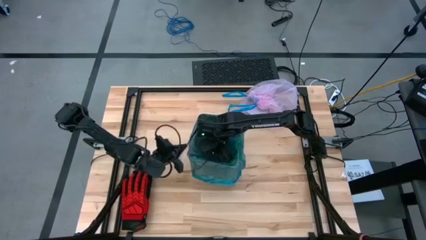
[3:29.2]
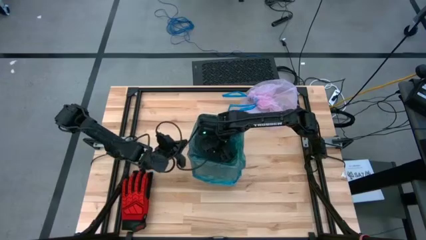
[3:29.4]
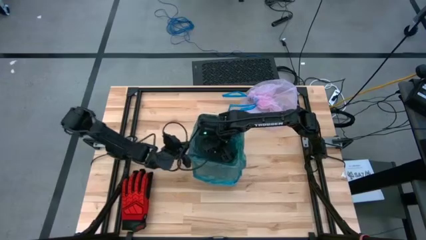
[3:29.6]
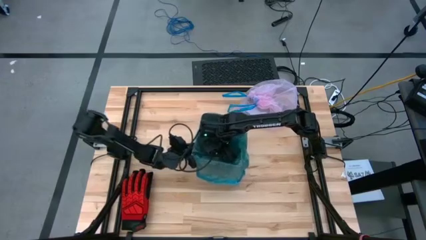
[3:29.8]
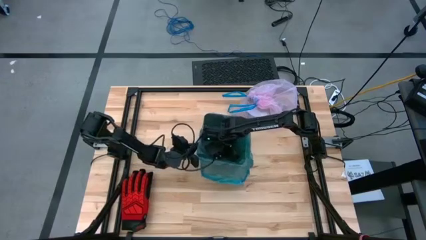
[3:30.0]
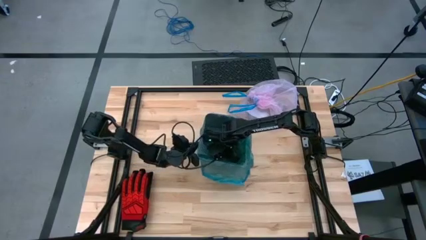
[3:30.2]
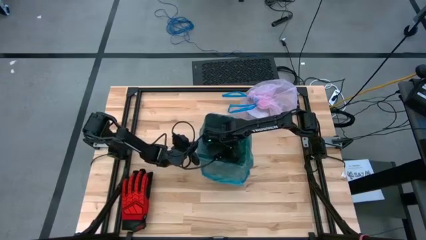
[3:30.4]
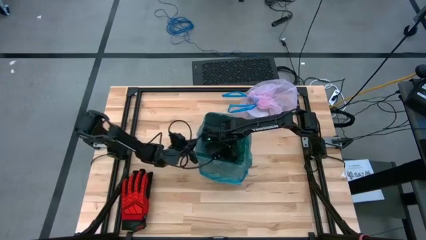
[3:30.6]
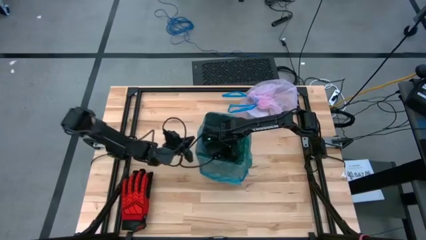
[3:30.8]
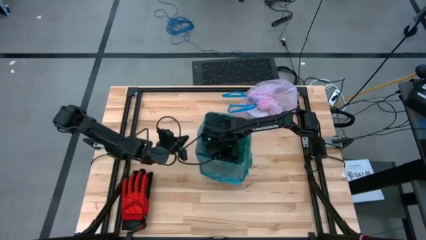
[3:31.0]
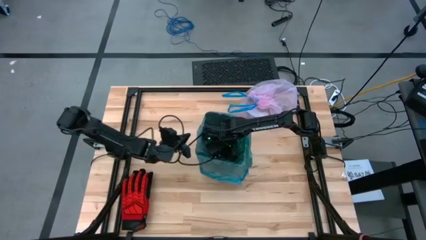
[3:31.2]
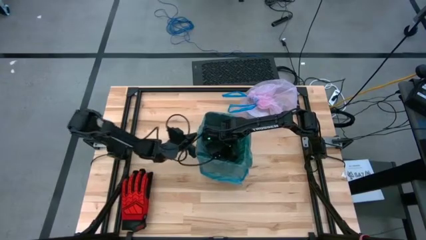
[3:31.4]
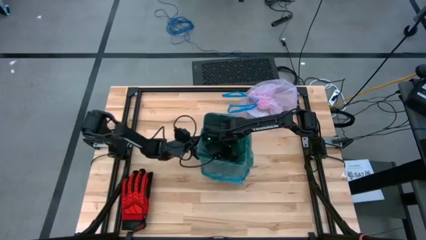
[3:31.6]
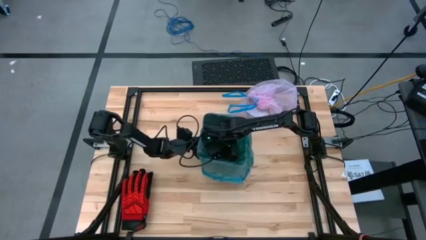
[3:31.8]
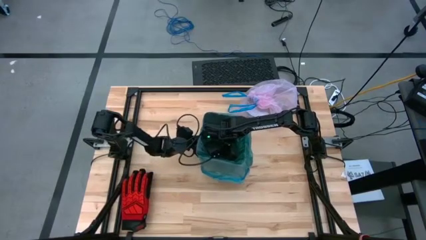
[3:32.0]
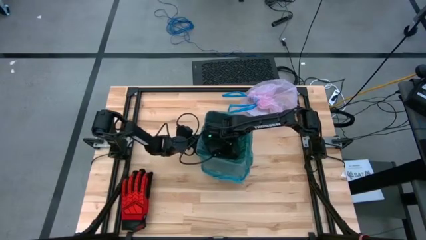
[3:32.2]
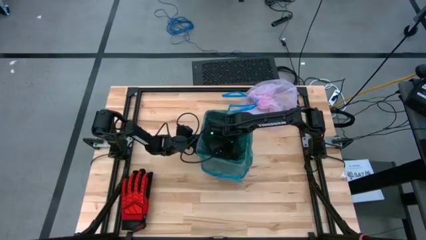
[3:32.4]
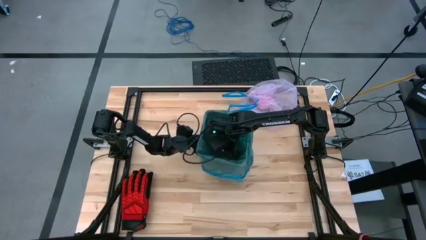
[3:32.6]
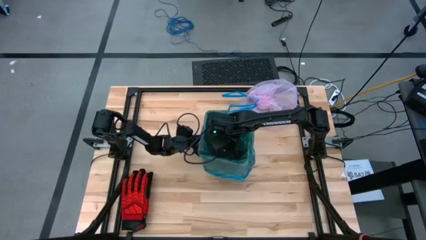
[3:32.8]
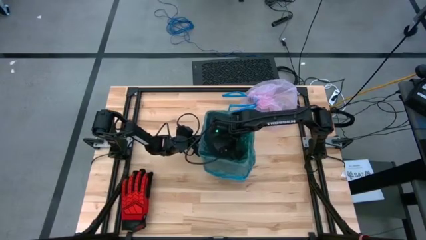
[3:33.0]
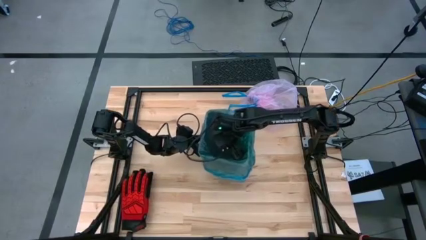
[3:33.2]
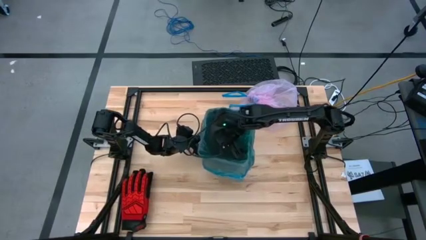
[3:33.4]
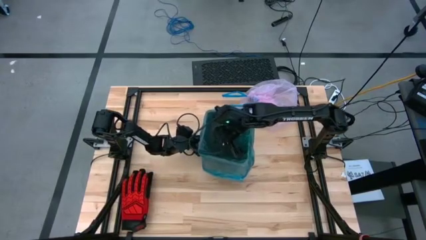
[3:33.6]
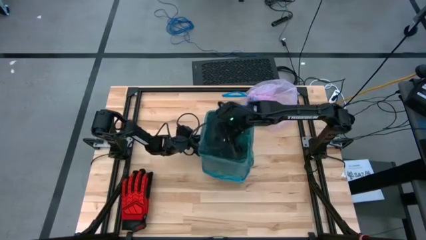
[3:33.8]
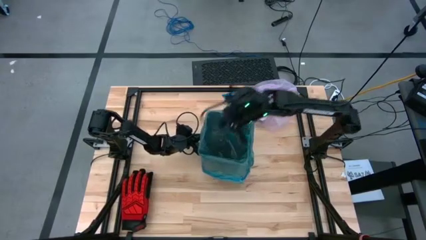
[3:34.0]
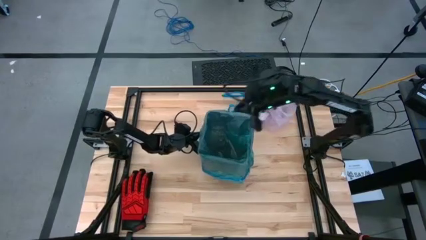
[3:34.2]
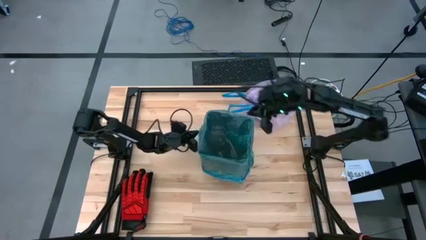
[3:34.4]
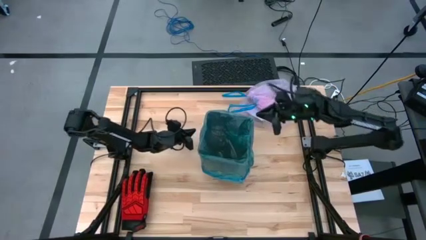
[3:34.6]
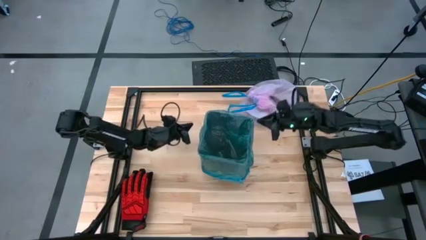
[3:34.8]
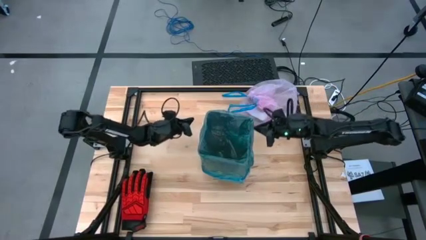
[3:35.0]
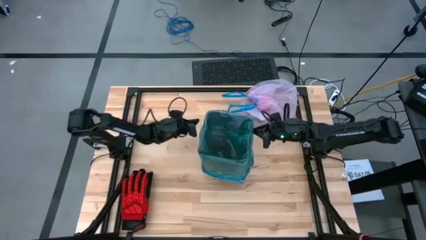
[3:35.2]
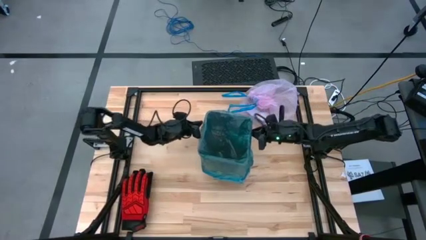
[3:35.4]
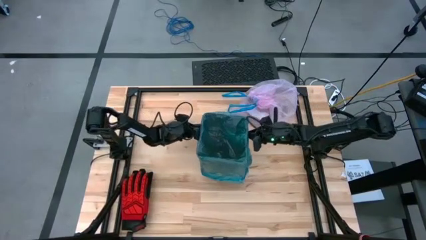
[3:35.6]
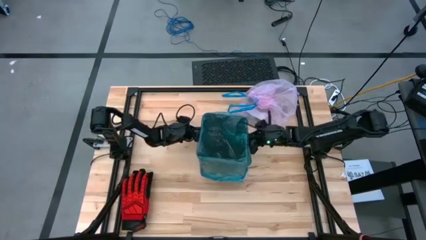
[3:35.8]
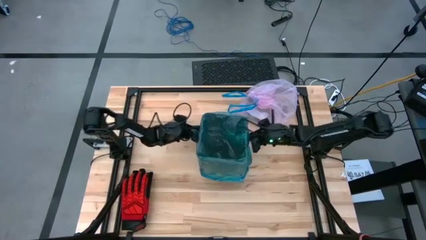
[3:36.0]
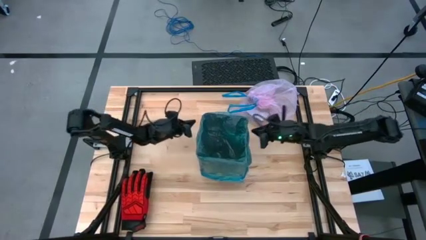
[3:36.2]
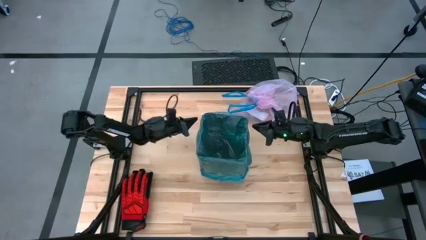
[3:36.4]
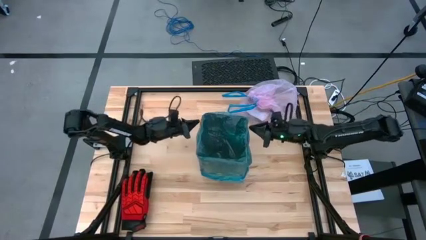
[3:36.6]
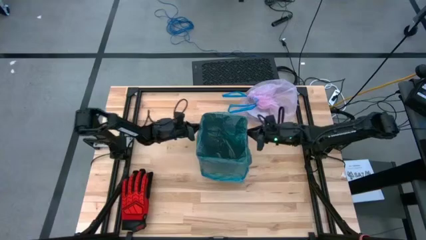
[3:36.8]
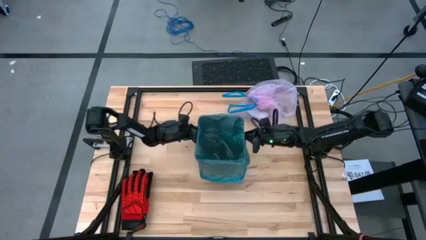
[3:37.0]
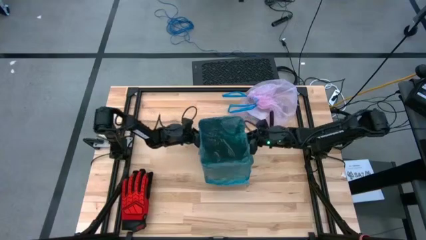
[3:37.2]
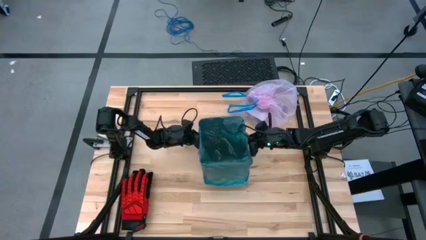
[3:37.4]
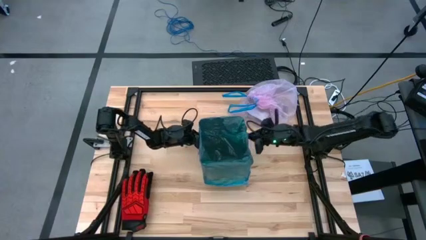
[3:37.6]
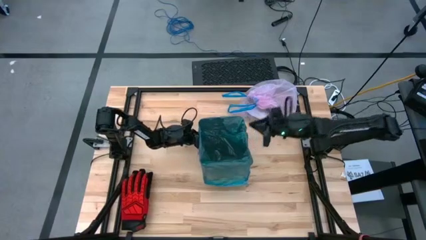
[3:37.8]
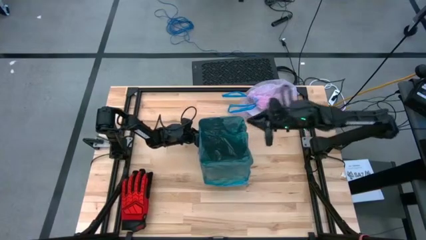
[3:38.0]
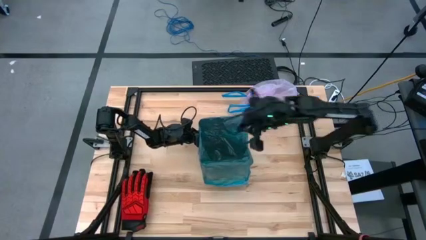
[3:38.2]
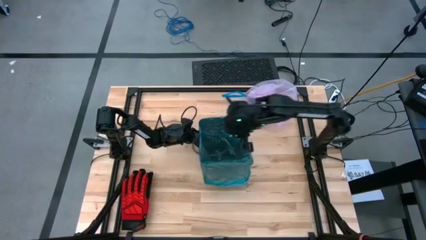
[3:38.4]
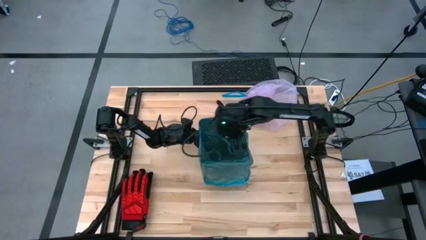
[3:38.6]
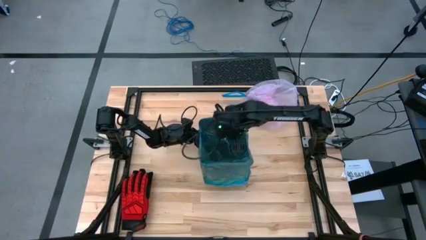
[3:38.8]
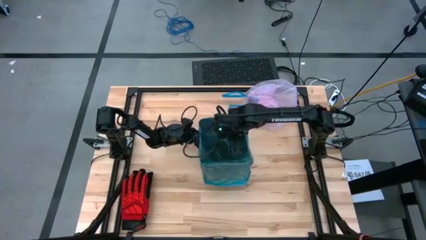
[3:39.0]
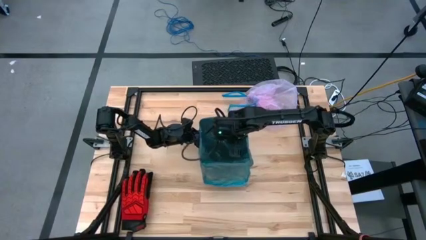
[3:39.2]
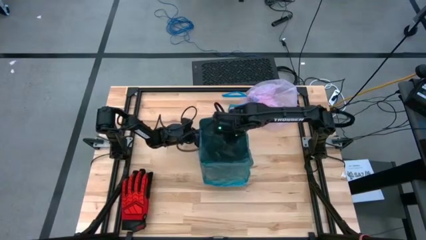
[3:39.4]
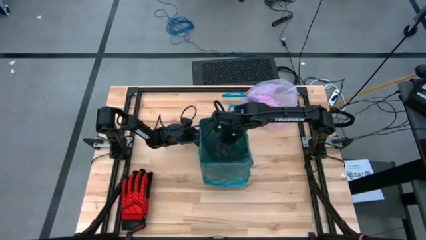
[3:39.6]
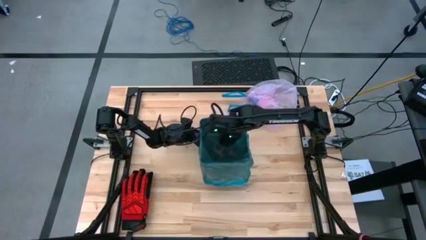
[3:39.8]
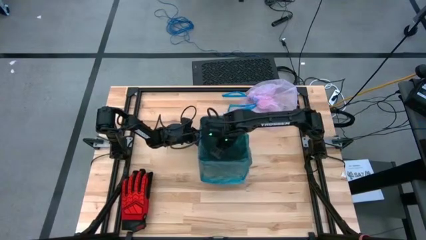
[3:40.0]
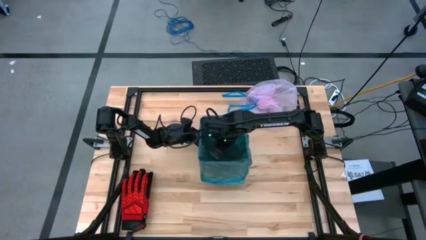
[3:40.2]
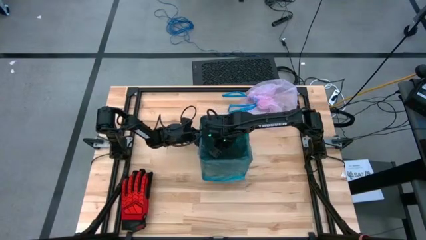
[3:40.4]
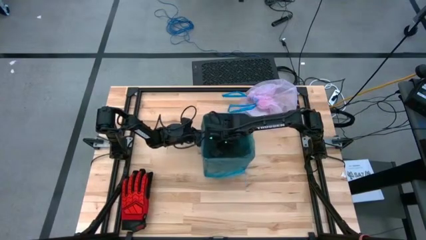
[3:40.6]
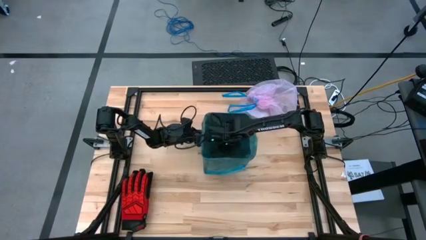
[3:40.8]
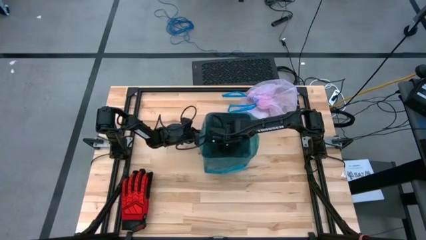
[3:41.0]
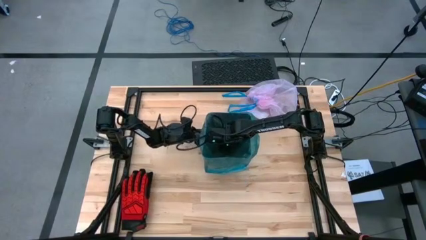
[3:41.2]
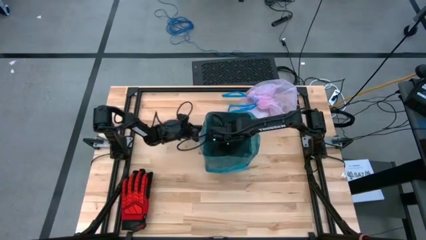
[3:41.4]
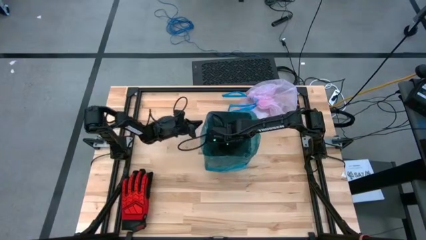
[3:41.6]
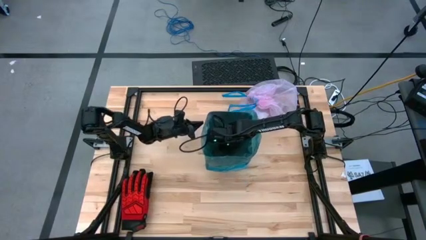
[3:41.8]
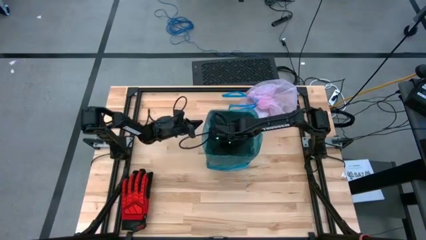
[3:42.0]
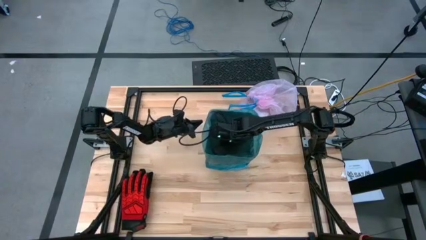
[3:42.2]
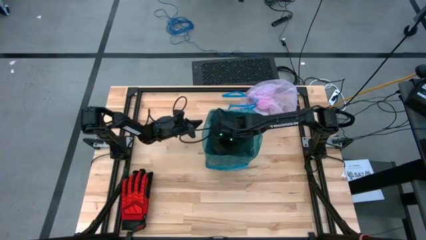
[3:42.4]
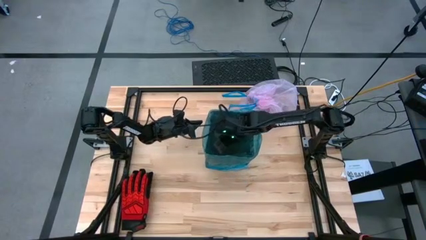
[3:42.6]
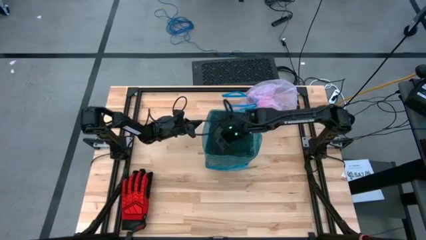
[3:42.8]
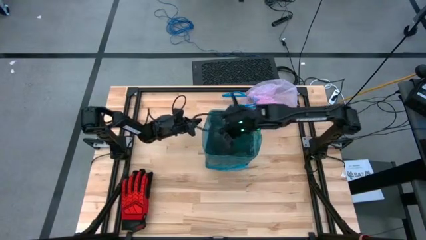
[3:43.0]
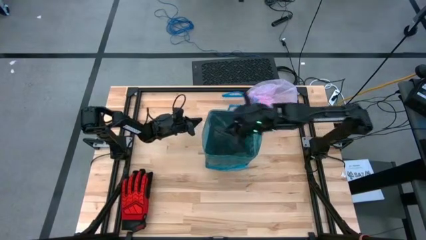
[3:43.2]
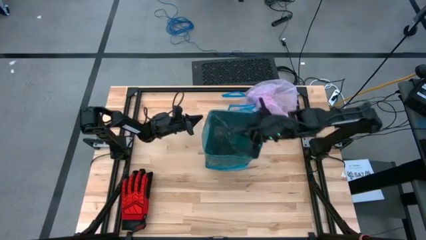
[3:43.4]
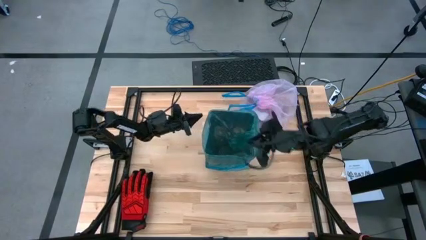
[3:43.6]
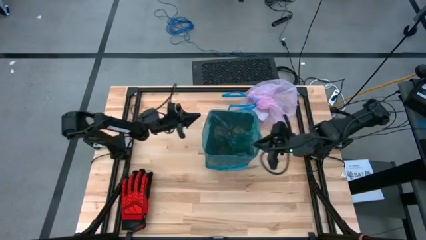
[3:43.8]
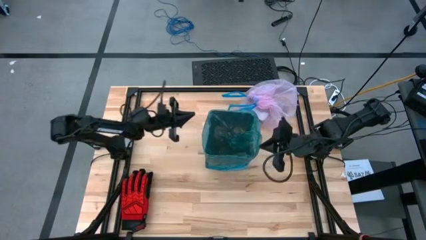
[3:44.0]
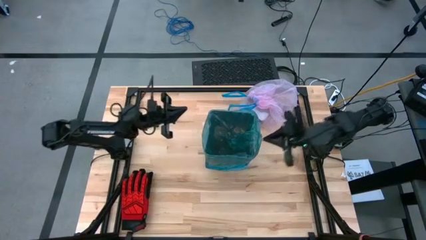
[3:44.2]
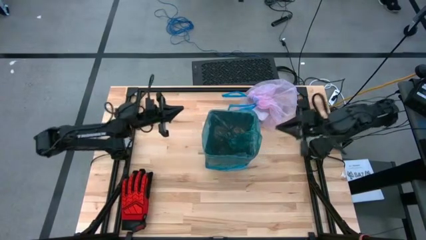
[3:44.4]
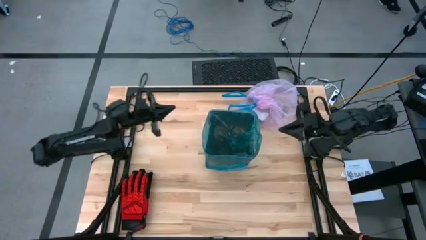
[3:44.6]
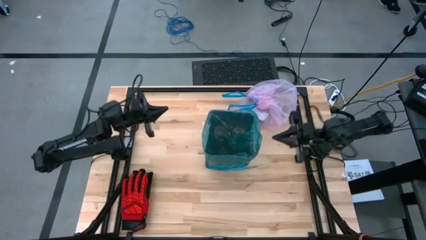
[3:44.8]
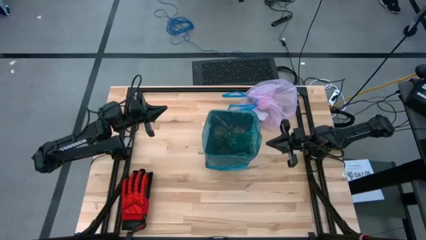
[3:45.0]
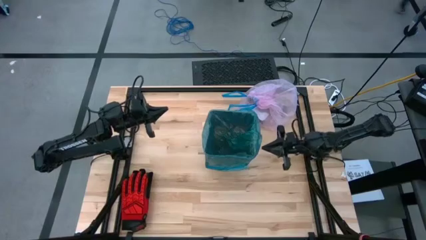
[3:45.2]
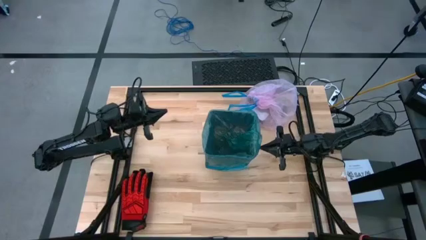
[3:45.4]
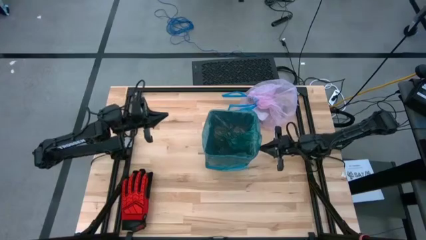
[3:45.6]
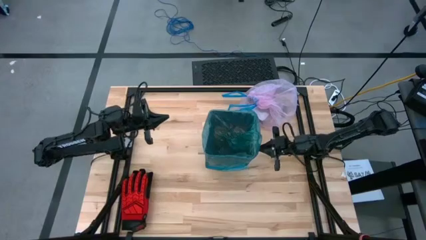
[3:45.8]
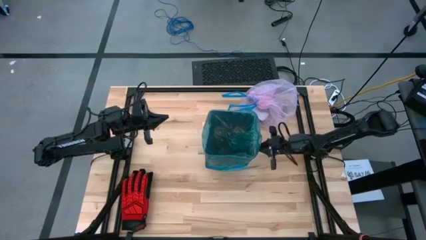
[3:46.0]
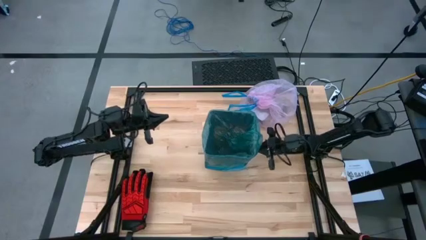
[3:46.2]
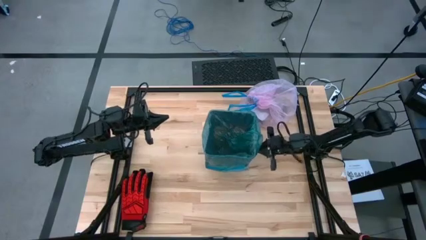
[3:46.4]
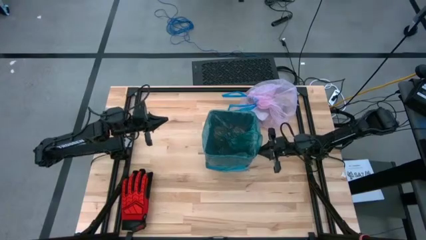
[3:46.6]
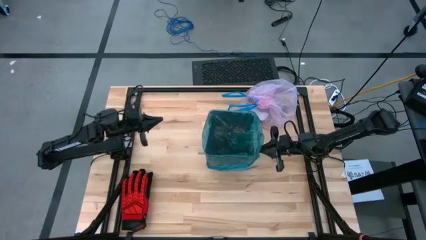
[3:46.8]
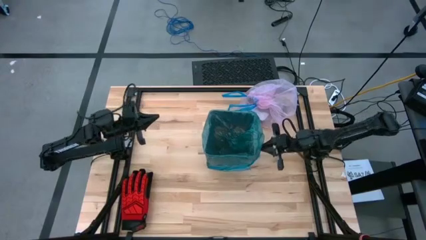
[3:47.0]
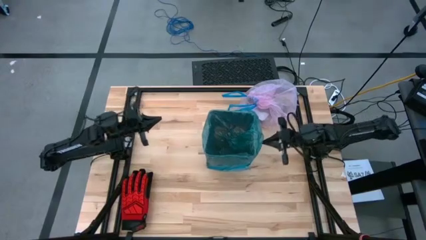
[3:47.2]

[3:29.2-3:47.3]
Task: place trash/remove bag and relplace
Insert the blue trash bag into the trash bin
